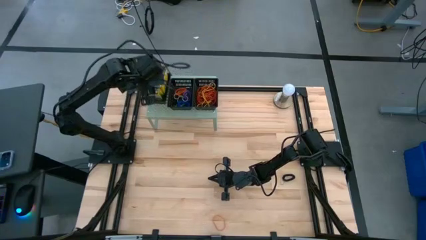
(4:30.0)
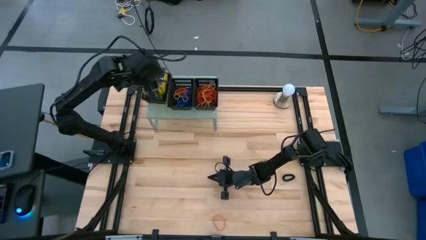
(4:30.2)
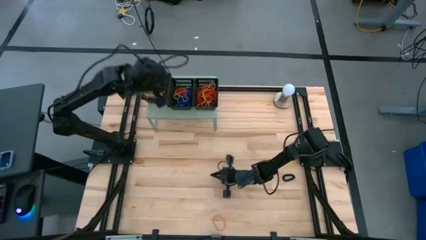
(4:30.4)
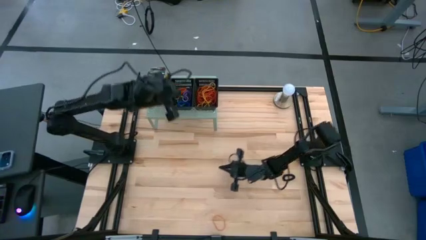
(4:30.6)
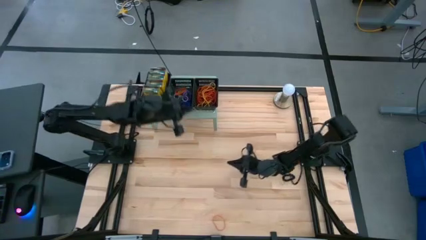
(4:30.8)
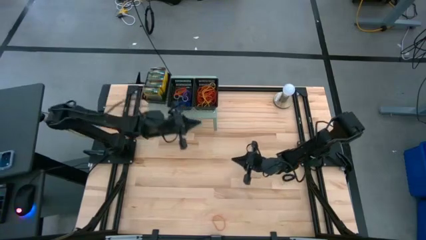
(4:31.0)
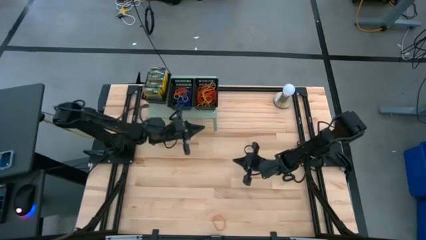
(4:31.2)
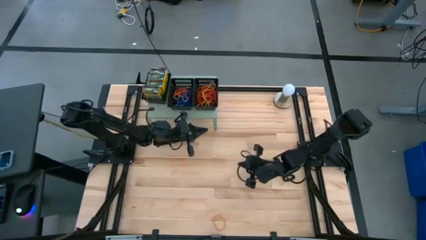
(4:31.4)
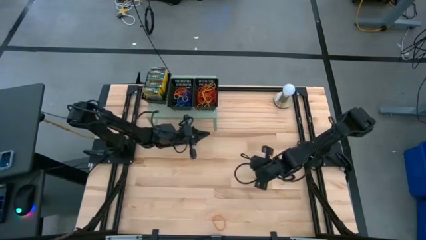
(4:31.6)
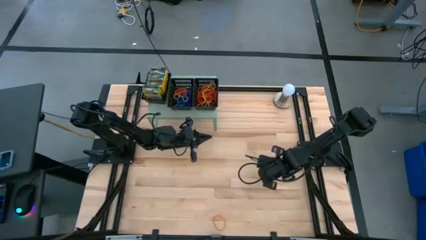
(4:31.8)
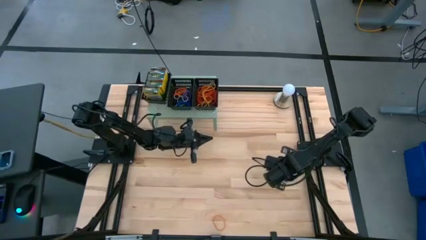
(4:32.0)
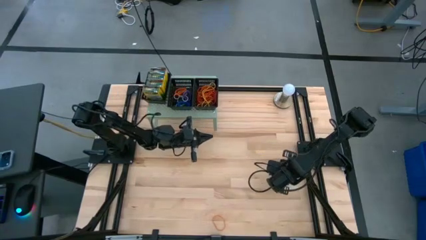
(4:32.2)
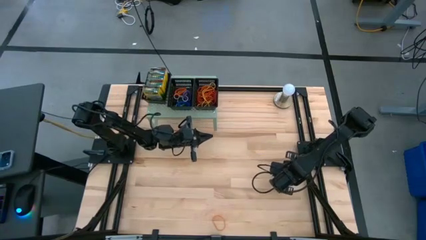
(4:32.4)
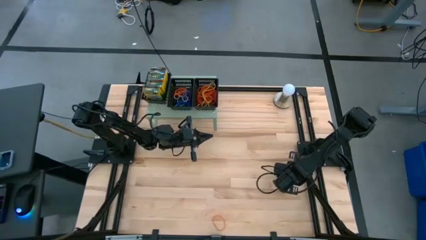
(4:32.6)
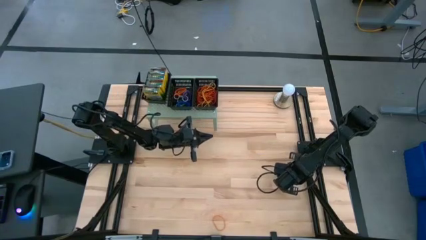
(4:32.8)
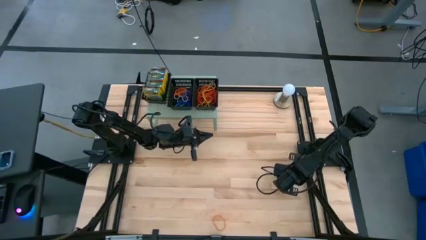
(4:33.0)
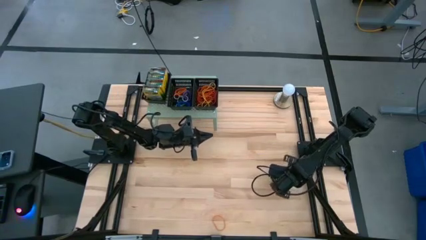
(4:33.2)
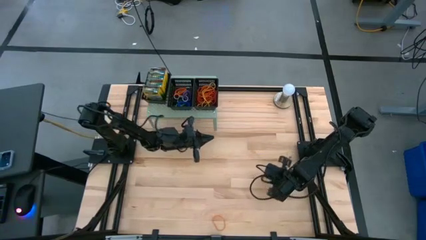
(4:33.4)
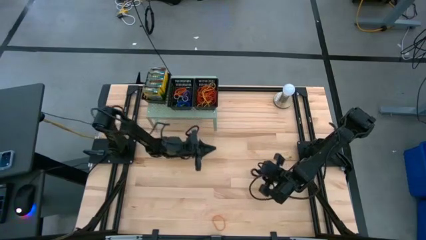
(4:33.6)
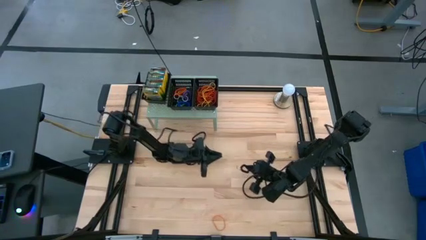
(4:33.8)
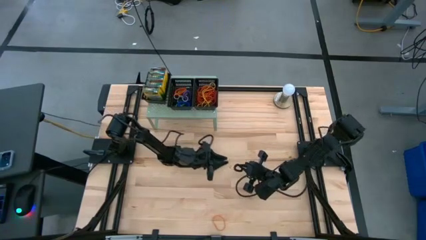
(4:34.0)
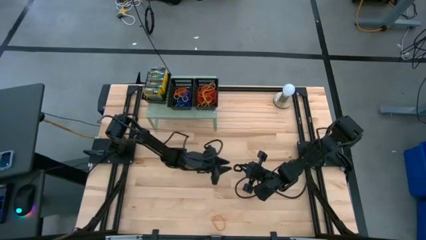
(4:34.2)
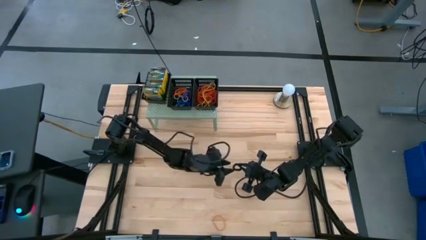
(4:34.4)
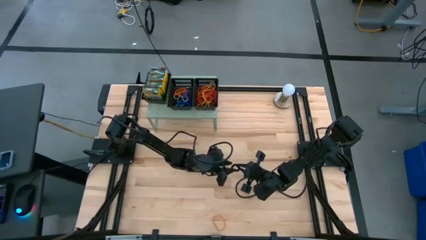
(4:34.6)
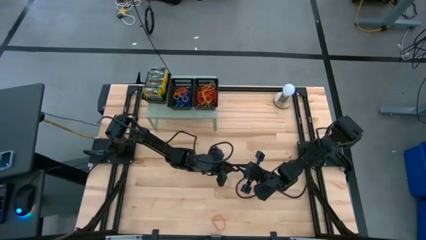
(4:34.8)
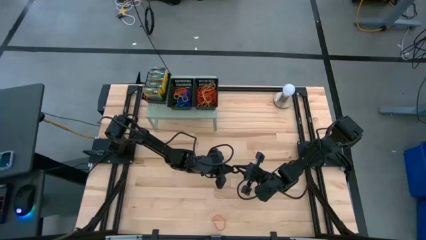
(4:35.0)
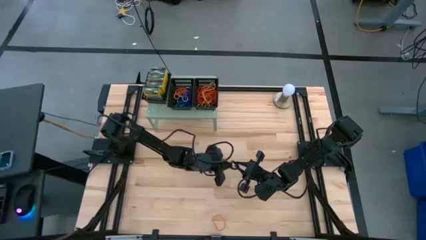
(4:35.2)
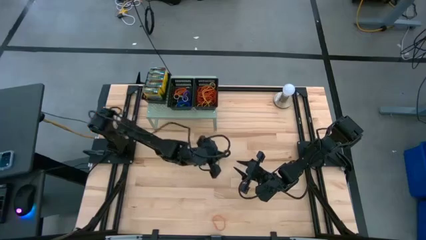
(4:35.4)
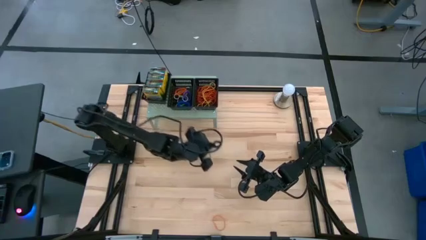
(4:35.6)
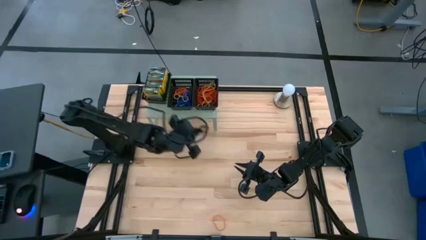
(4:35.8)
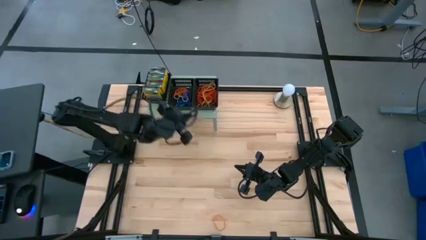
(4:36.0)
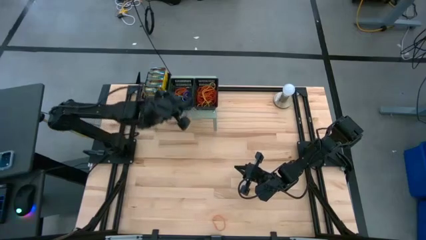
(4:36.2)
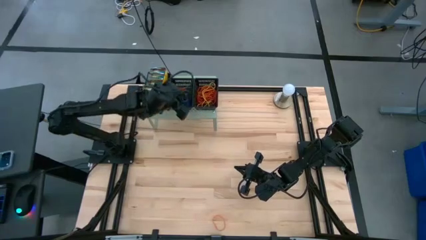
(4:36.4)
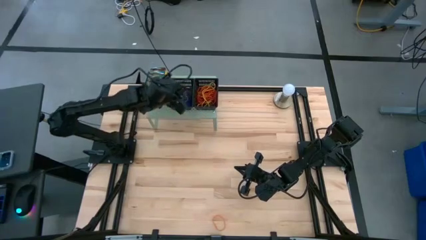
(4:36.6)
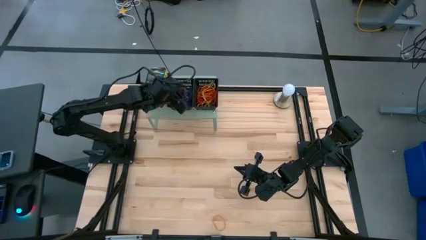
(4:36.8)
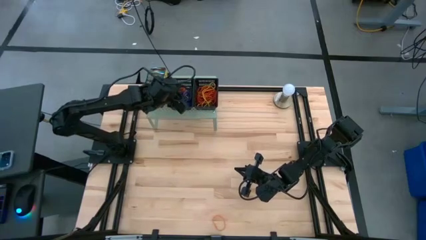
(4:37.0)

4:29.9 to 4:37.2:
Task: Pick & Place Office Desk Supplies
Put the black spring keychain into the middle black bin on the shelf

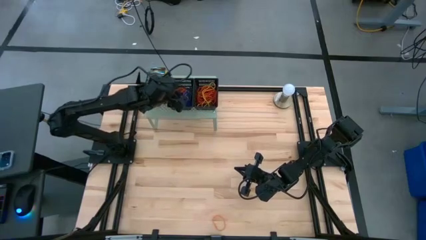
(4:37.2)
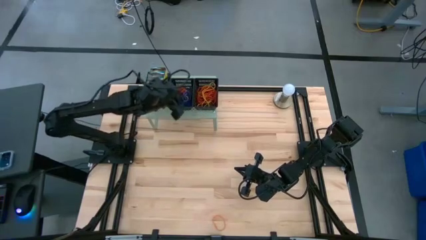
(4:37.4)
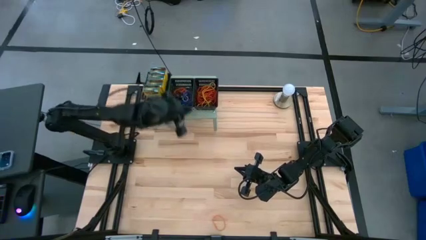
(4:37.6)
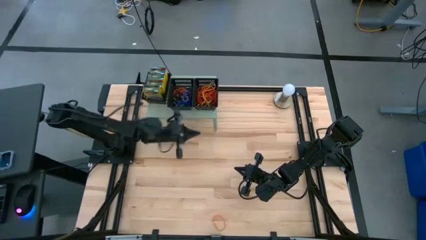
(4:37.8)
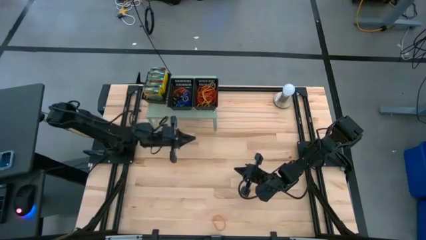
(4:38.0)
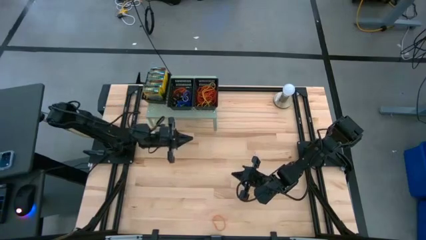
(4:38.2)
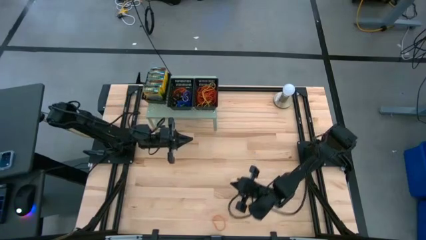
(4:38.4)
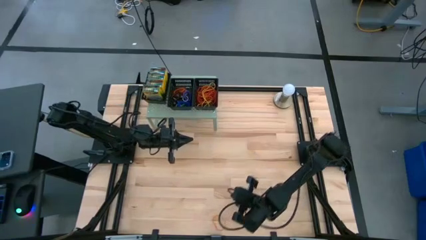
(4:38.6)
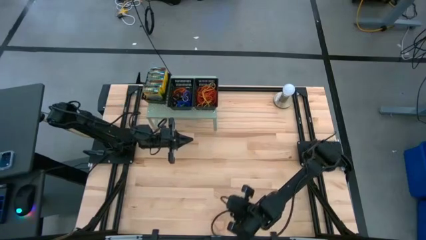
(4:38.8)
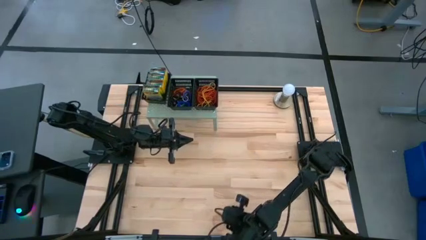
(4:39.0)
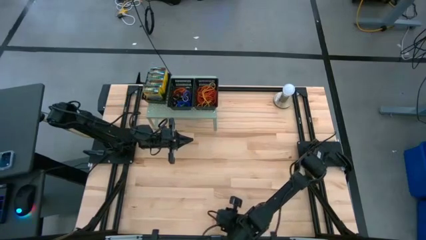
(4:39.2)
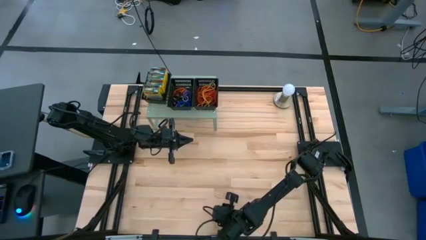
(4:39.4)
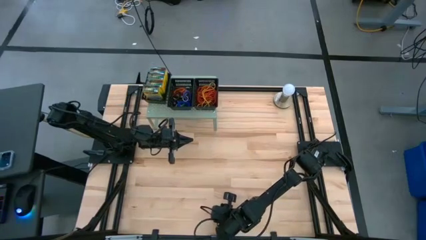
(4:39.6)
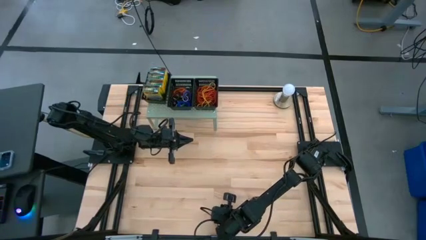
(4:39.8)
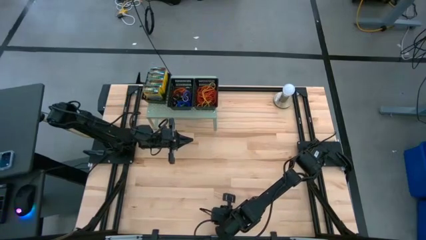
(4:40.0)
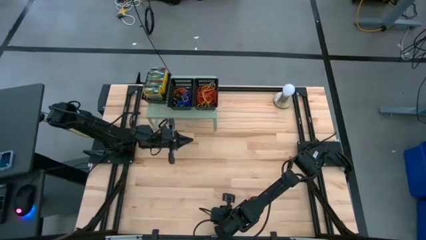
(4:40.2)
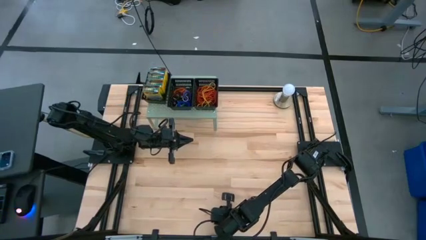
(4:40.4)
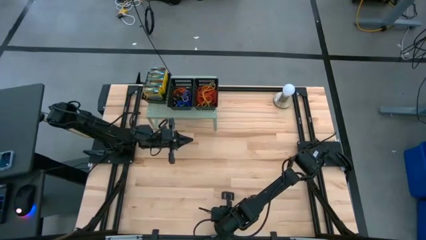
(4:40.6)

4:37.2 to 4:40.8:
Put the orange rubber band into the right black bin on the shelf

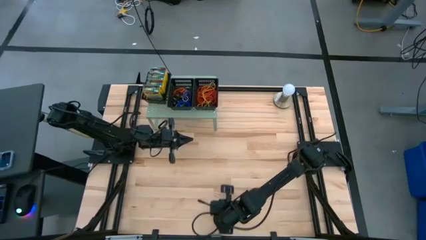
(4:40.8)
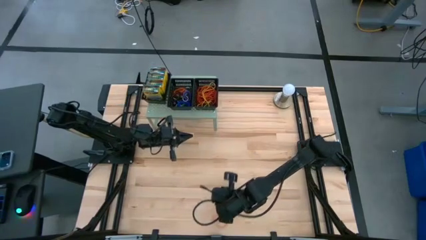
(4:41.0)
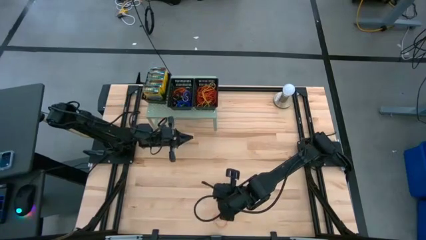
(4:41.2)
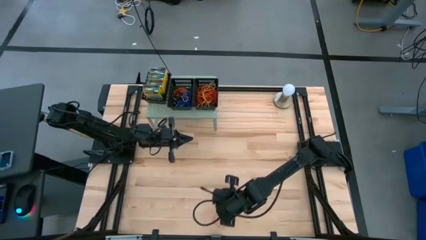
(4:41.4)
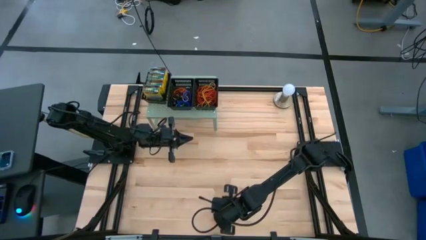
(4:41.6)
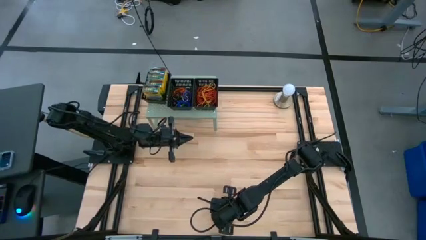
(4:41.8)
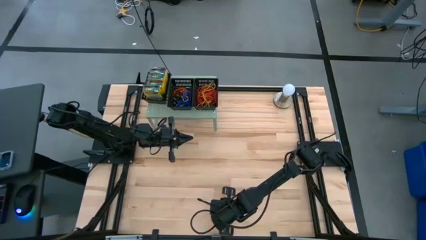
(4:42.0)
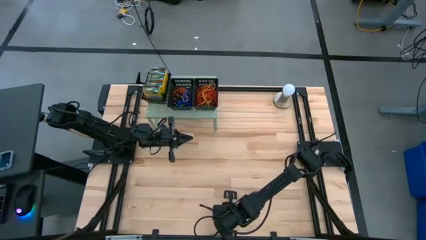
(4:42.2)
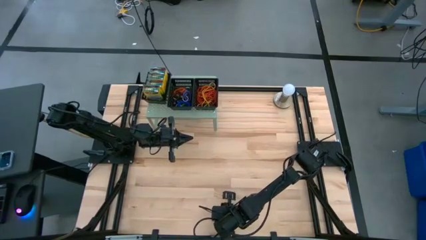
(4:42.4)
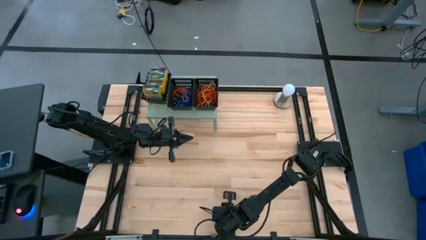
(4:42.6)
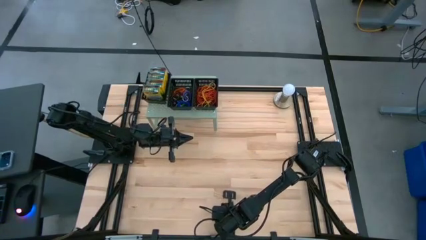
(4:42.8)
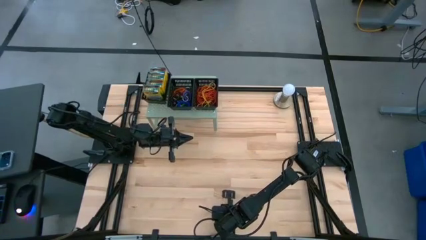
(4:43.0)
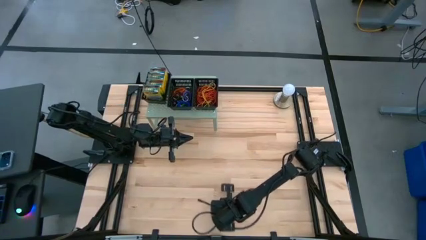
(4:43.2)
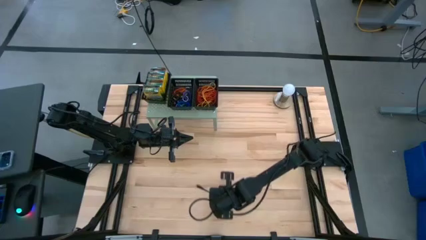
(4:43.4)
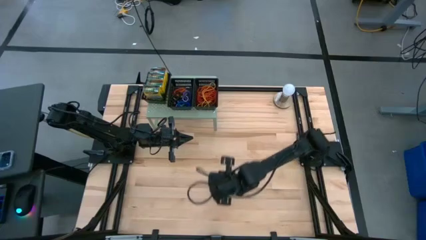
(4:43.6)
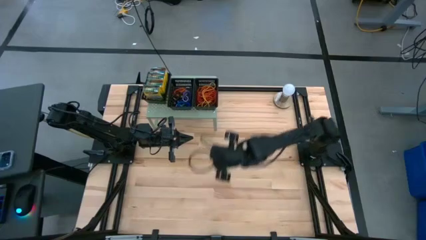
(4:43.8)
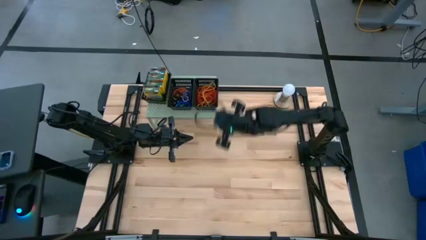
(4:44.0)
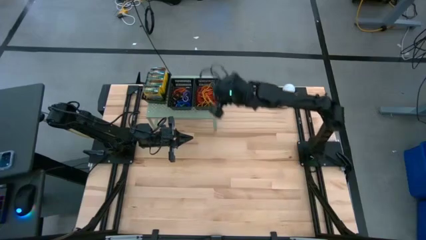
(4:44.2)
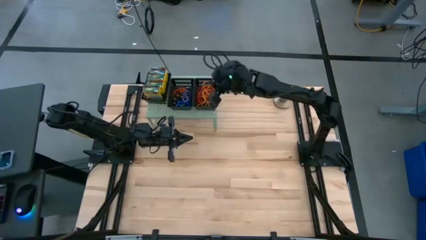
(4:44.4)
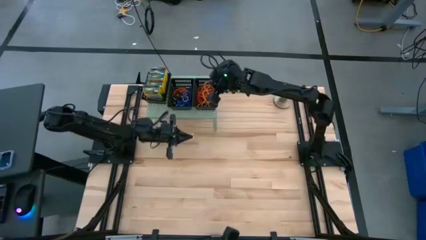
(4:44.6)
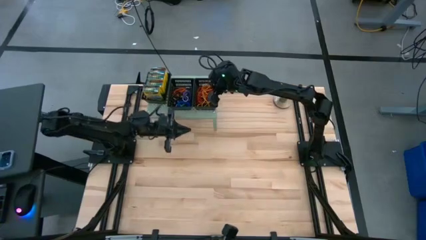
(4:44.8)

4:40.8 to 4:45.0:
Put the orange rubber band into the right black bin on the shelf

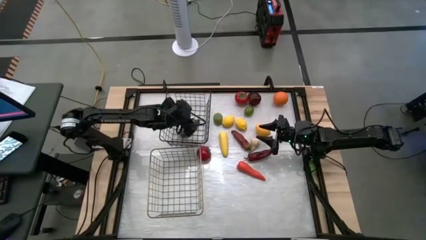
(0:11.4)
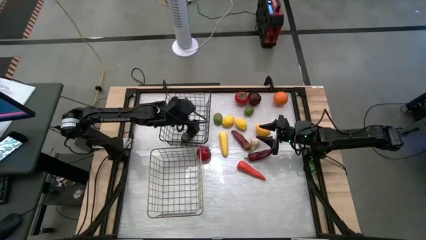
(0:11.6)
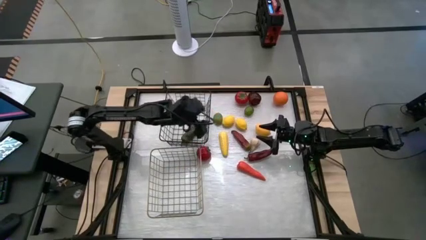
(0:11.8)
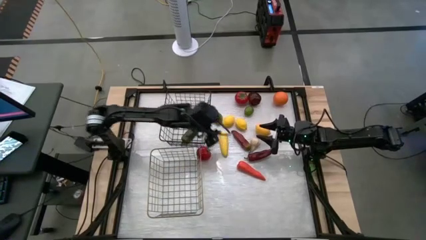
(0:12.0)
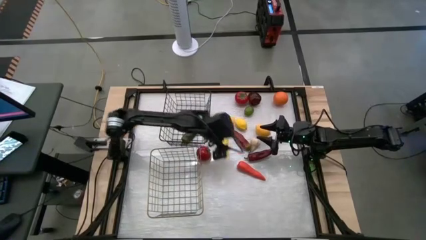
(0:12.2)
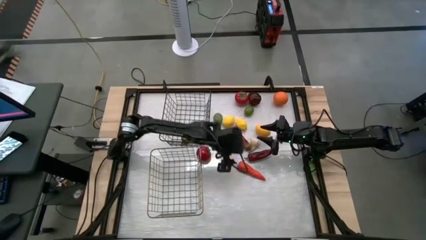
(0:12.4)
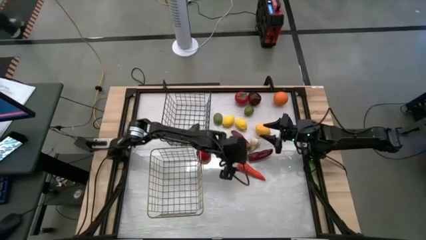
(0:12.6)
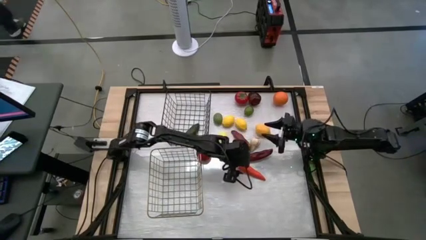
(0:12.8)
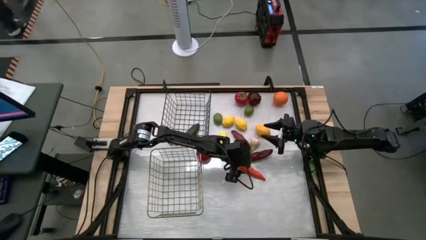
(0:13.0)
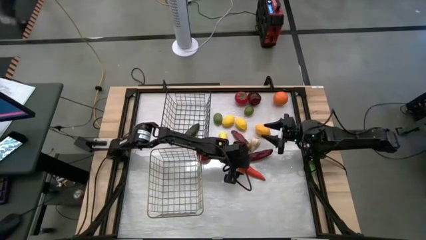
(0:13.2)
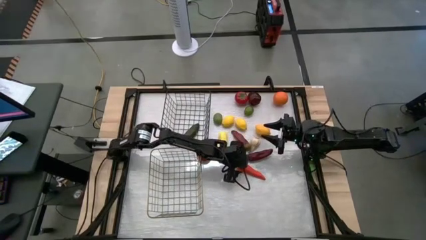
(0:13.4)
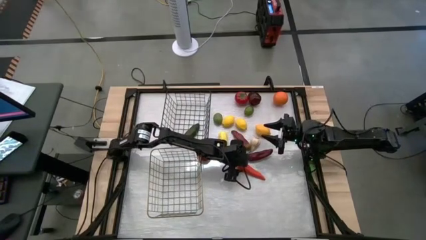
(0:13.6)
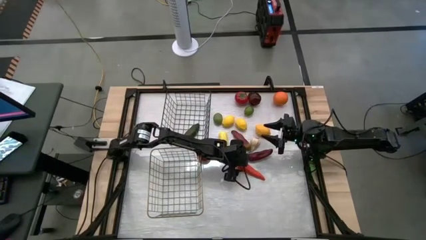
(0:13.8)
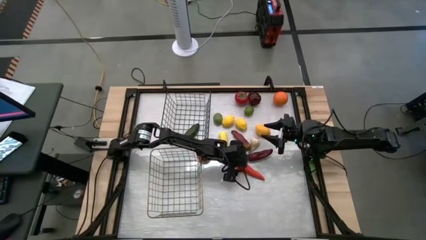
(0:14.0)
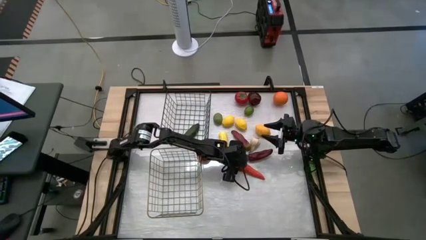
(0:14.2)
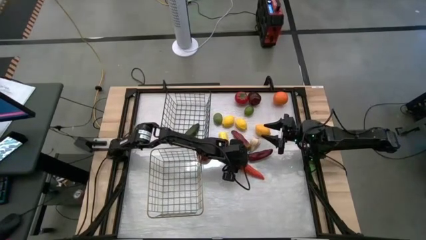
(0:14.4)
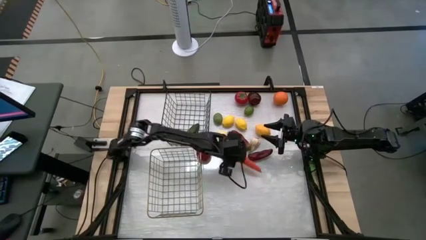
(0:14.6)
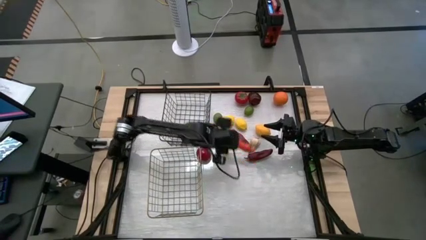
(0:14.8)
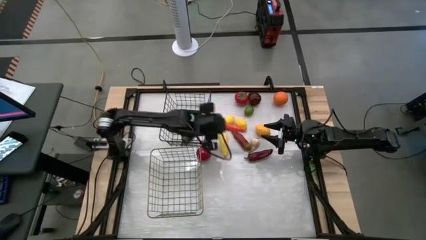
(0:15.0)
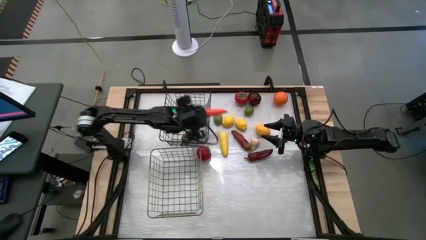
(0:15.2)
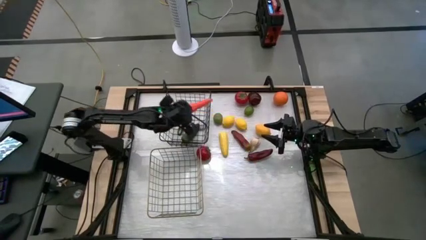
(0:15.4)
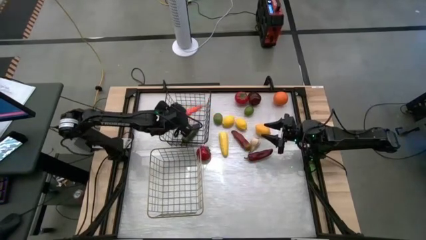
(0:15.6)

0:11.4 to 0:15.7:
Task: Sort produce into baskets
Put the orange carrot into the black wire basket
